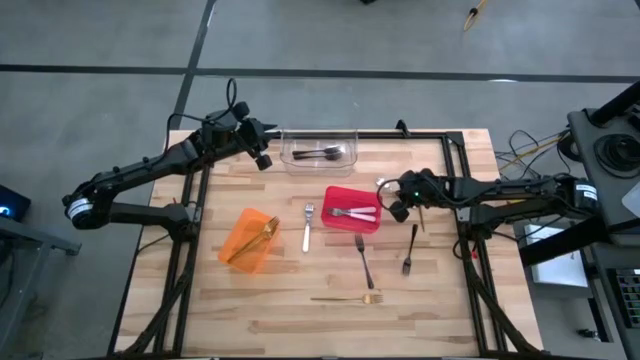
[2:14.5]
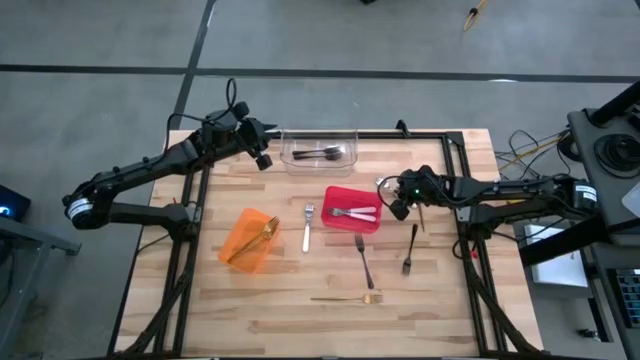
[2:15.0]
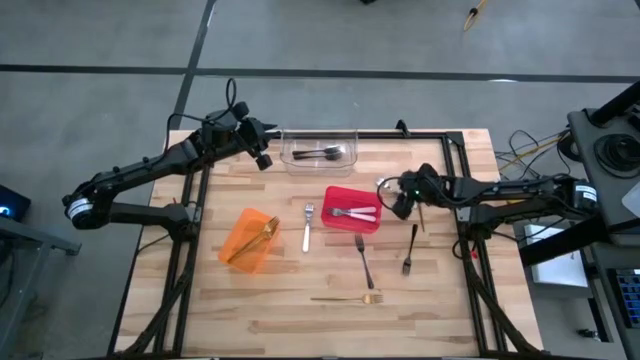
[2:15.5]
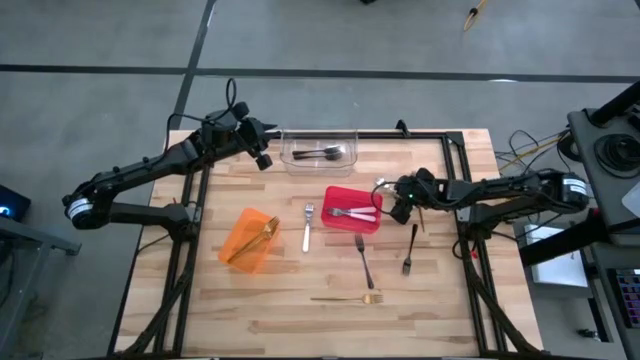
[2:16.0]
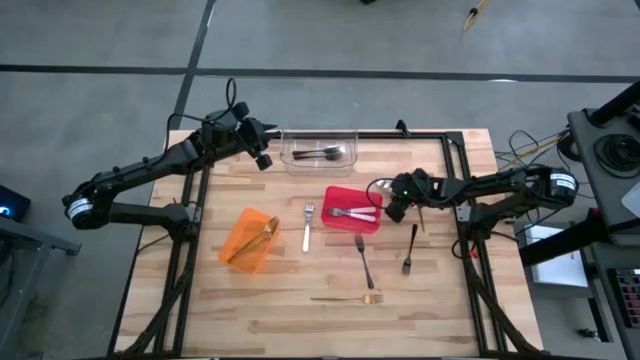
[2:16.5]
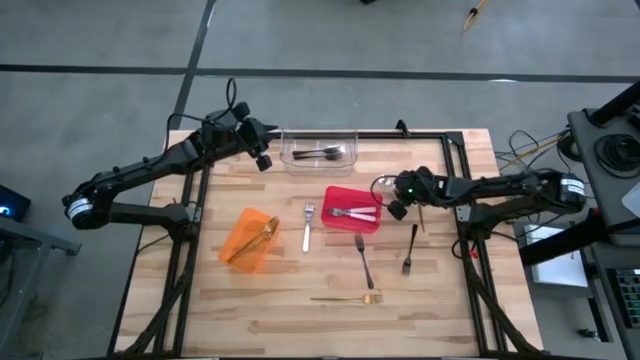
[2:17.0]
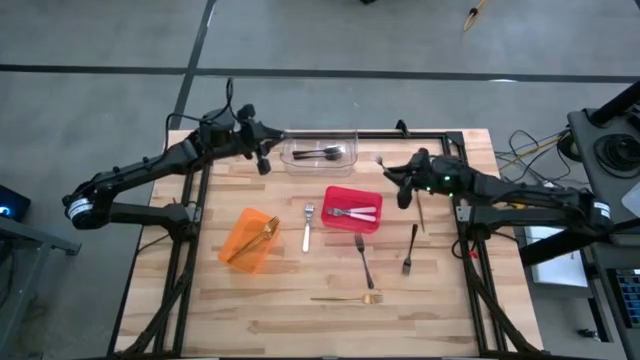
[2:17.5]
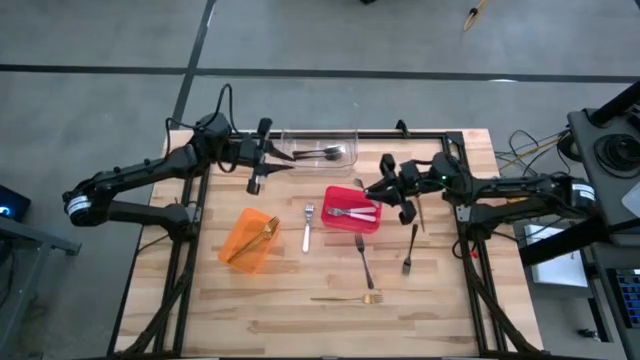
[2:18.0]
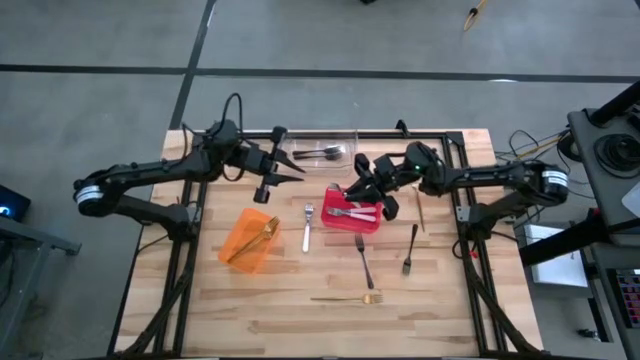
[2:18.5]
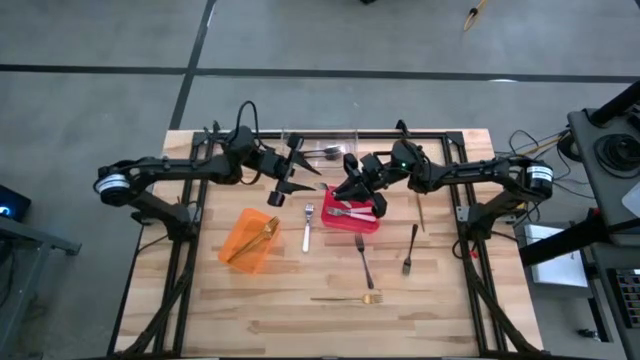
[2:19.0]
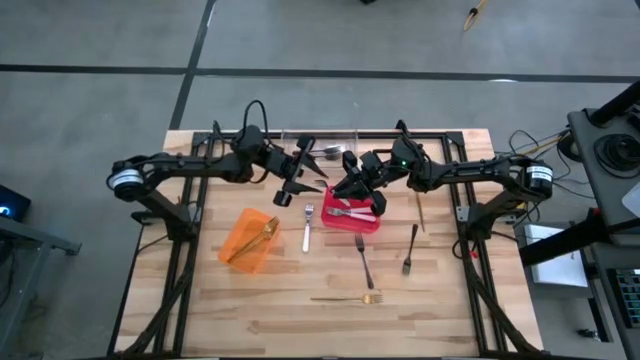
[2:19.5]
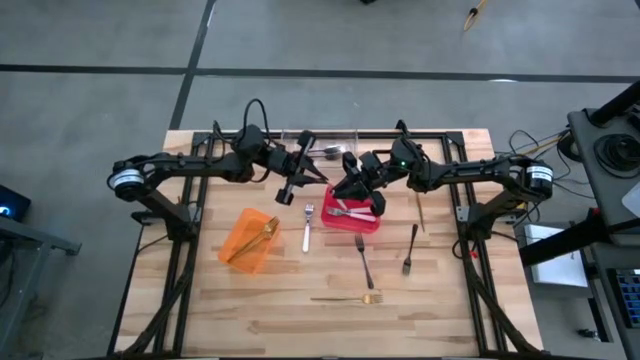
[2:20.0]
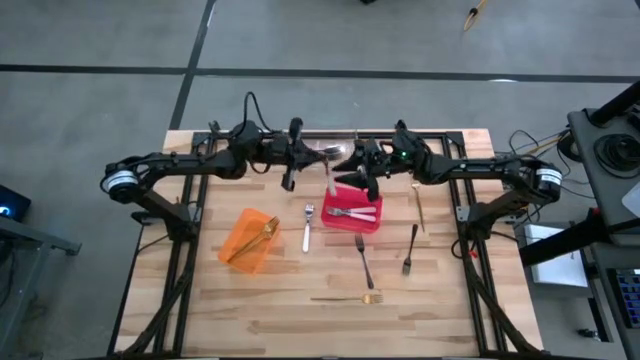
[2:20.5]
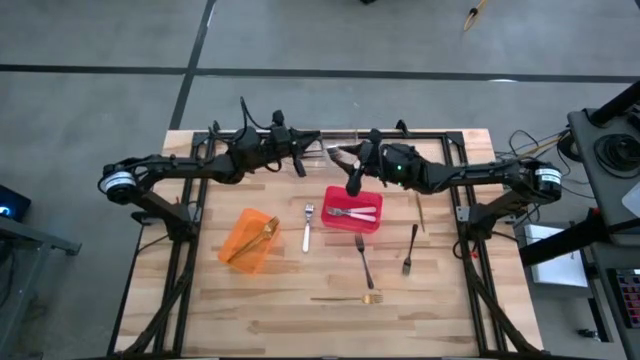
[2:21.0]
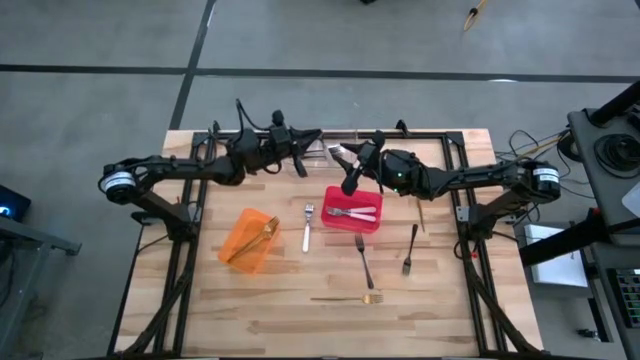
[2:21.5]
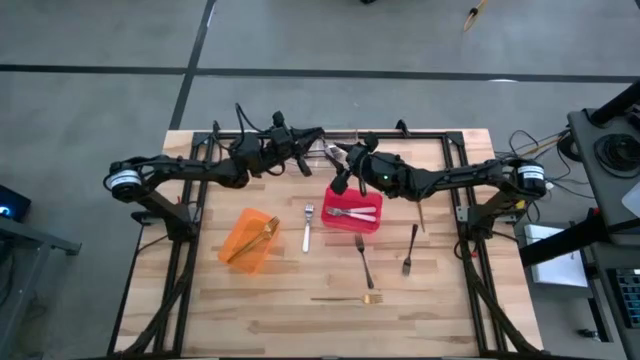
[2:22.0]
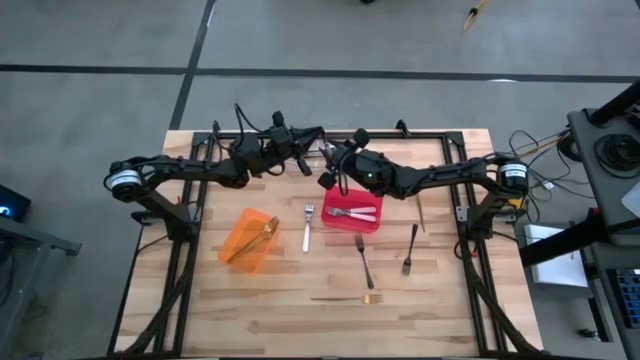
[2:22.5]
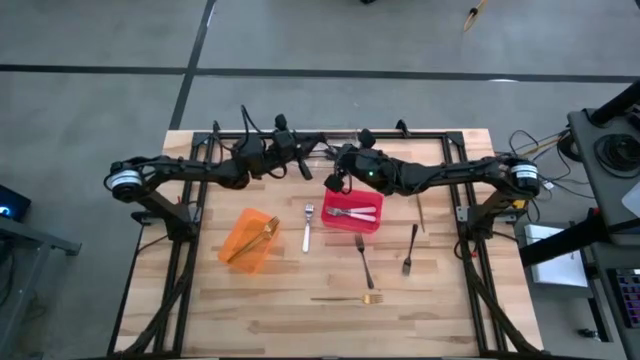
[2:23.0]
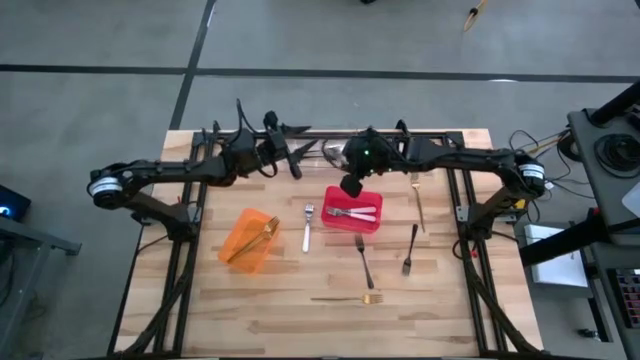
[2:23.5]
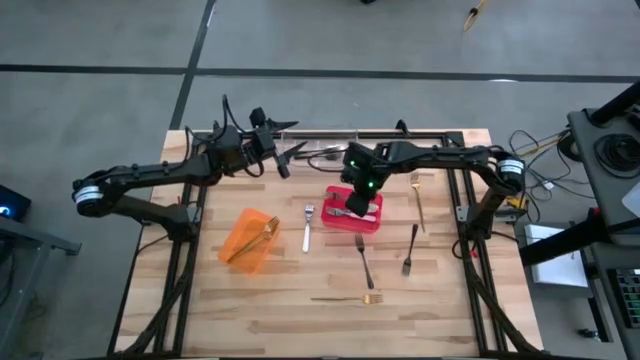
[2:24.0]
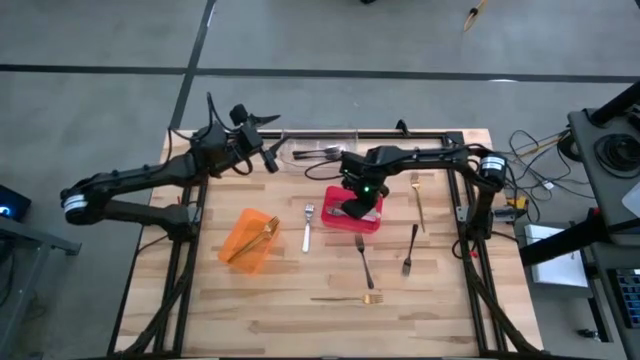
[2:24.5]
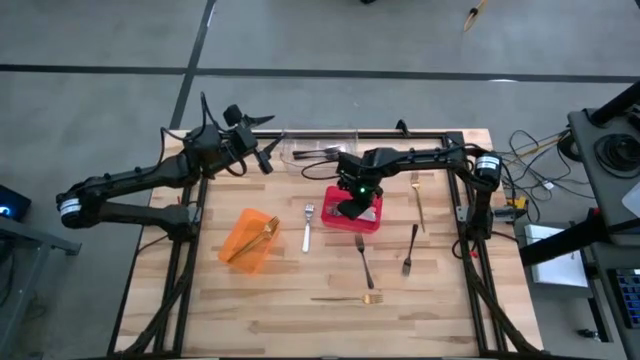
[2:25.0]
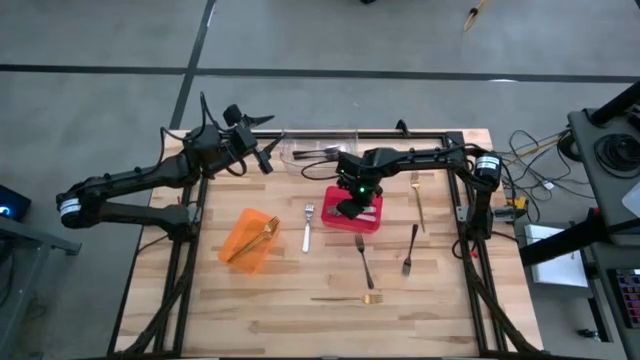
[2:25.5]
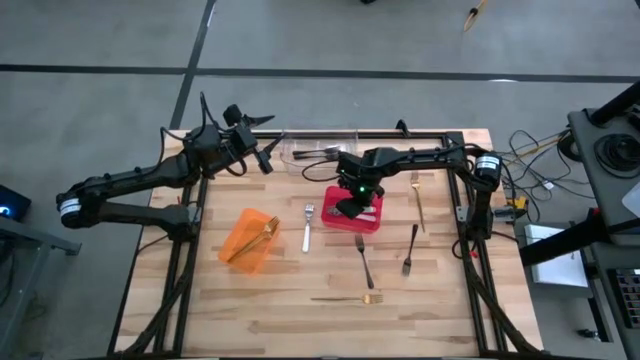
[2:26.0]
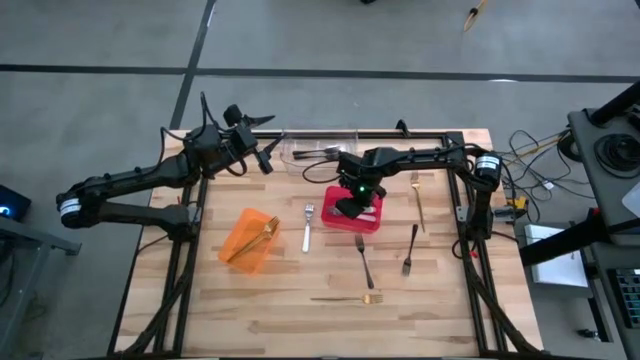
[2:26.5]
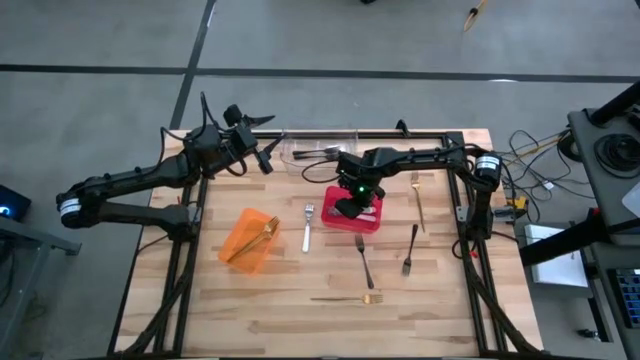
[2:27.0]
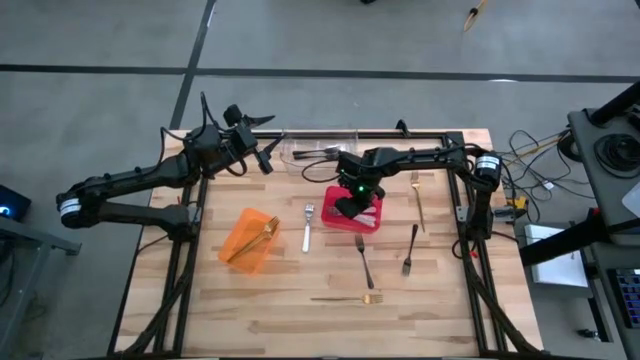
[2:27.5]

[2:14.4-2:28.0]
Task: Sort silverware by color (type)
Put the white fork into the red bin

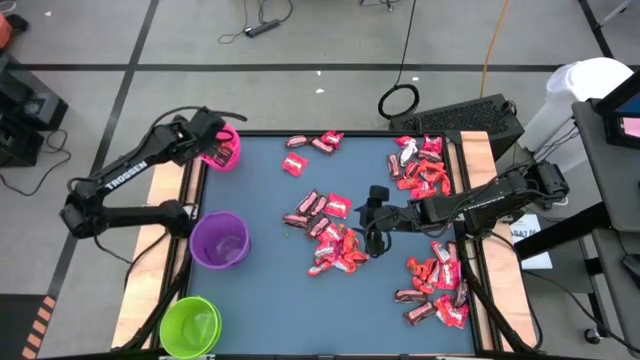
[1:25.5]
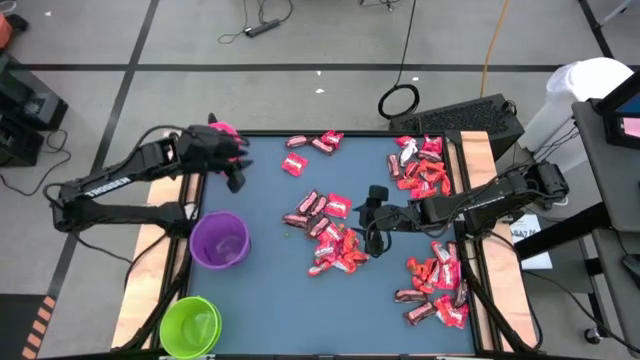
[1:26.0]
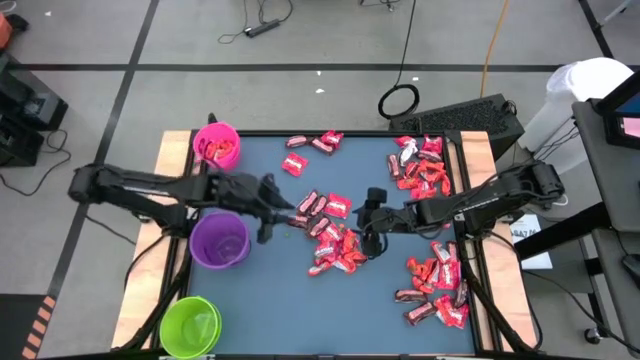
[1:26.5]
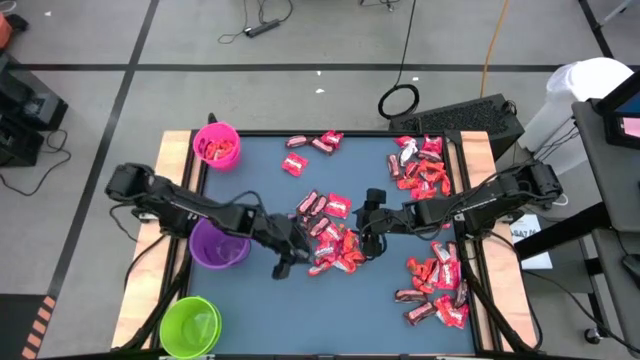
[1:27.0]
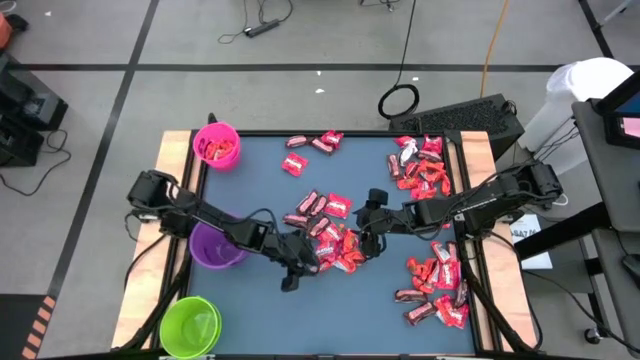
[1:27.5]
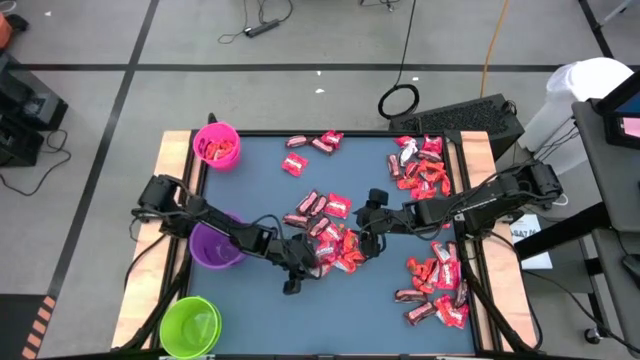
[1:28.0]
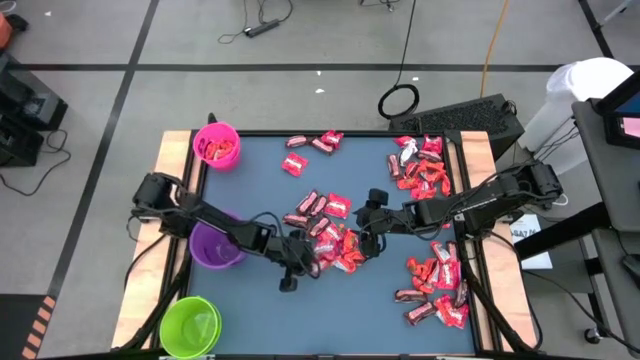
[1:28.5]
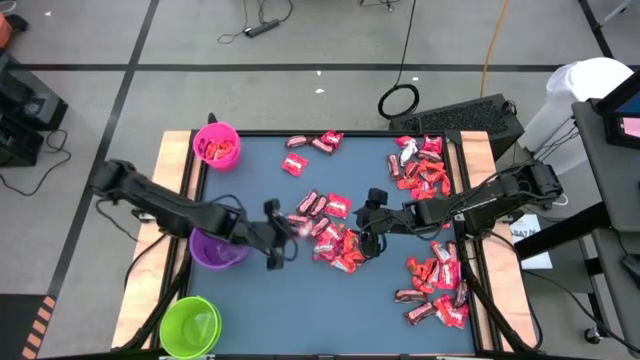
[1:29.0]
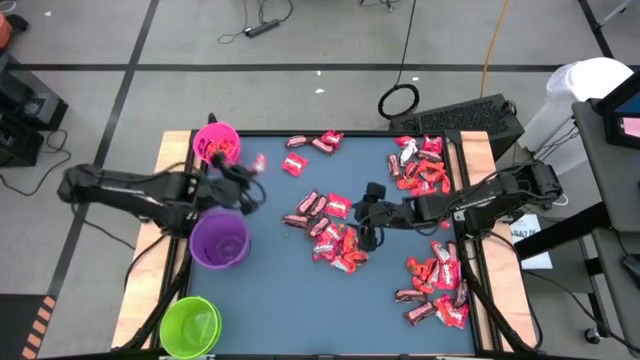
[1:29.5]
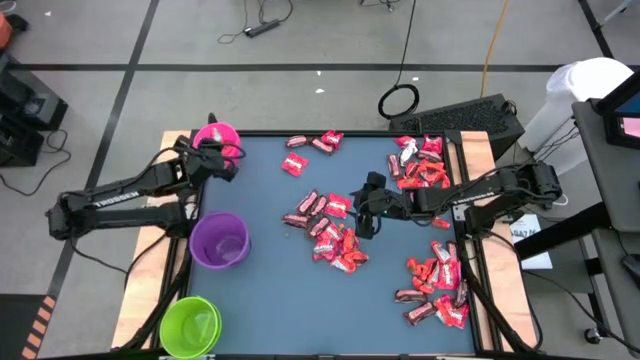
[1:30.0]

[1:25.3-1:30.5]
Task: Organize candy in baskets
Put the orange chocolate into the pink bucket

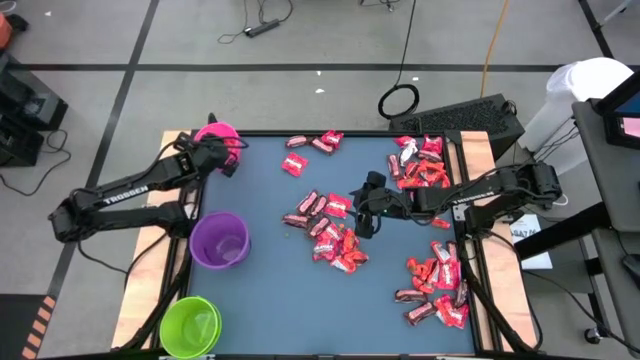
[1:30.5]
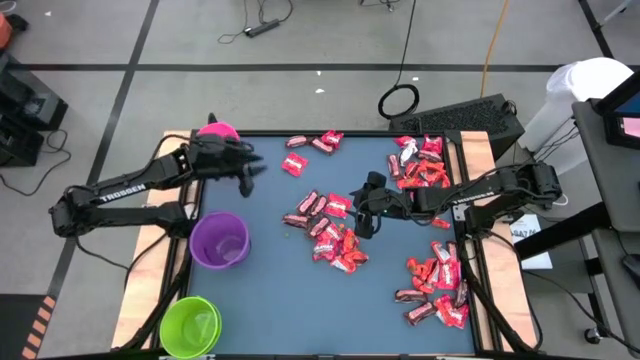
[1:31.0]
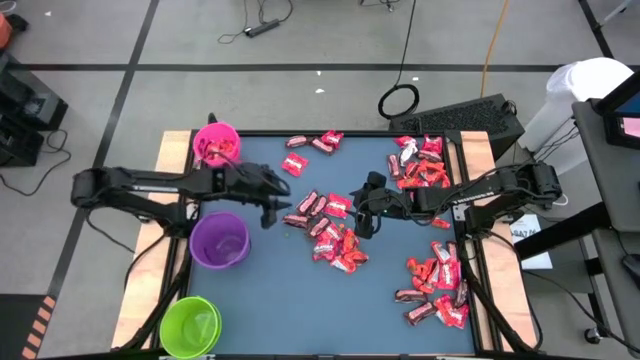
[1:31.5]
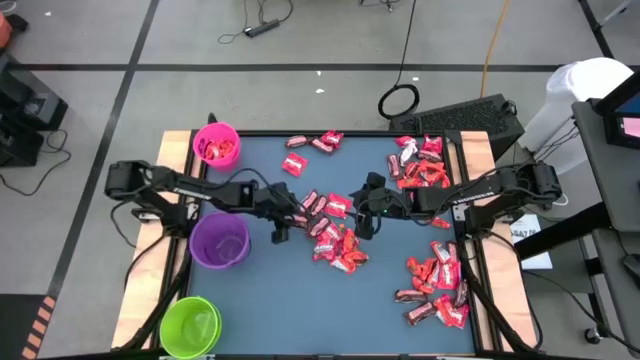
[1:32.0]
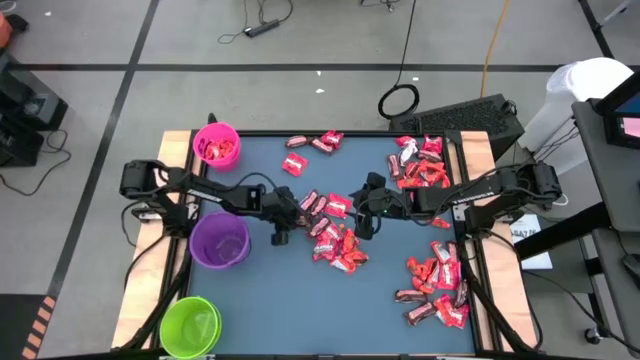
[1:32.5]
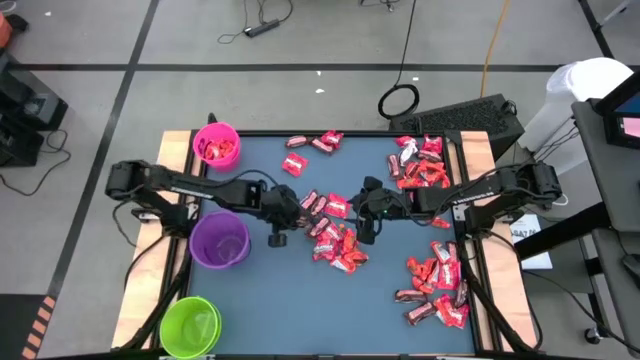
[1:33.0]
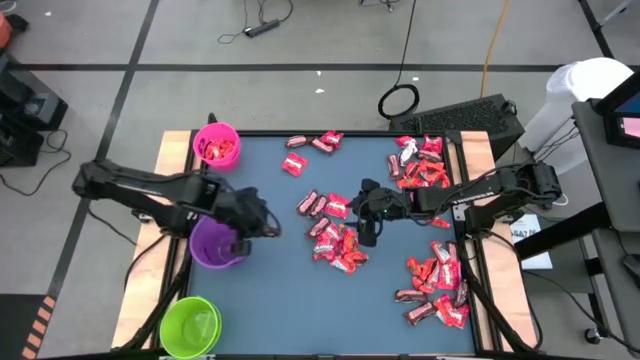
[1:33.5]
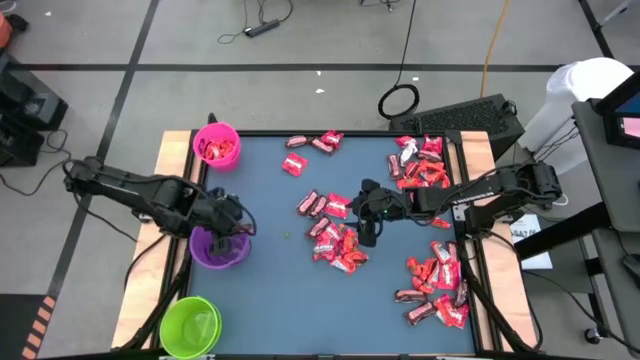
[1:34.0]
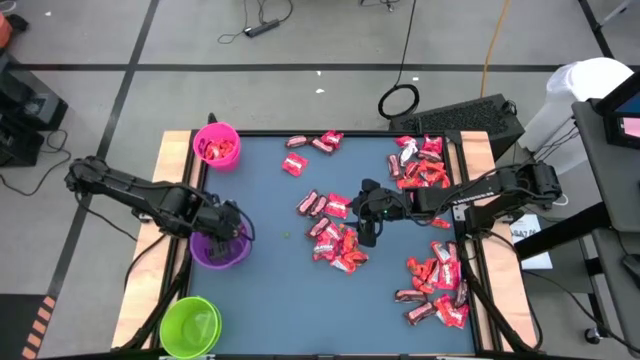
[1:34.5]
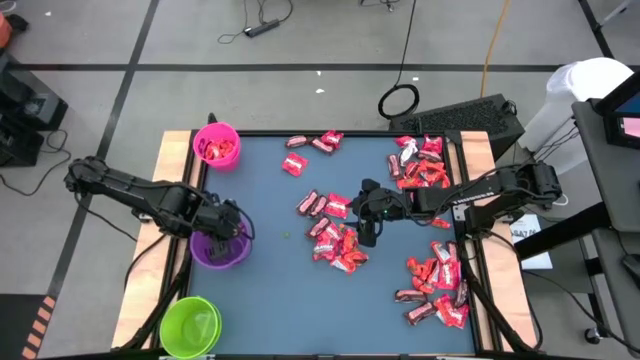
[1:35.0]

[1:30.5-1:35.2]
Put the brown chocolate into the violet bucket
